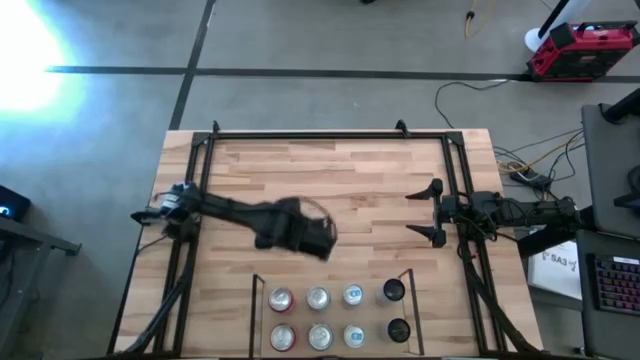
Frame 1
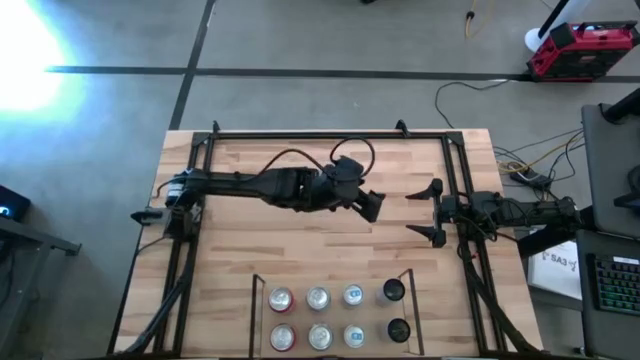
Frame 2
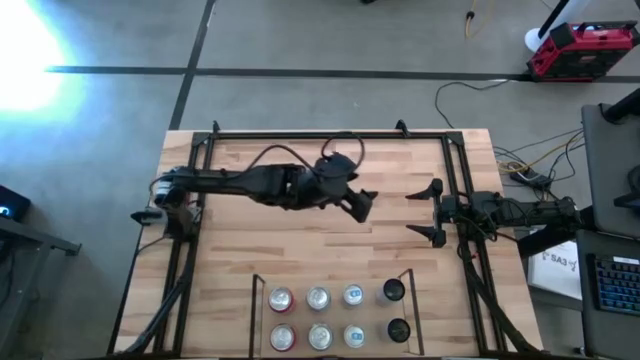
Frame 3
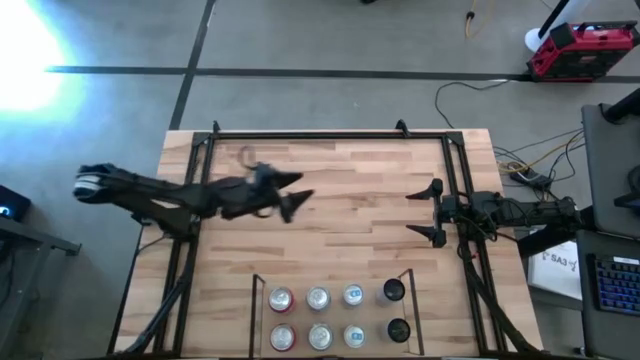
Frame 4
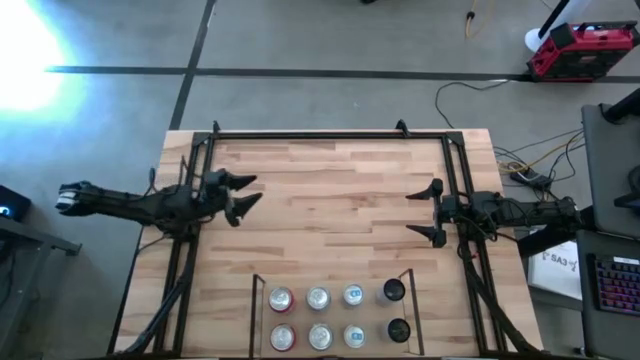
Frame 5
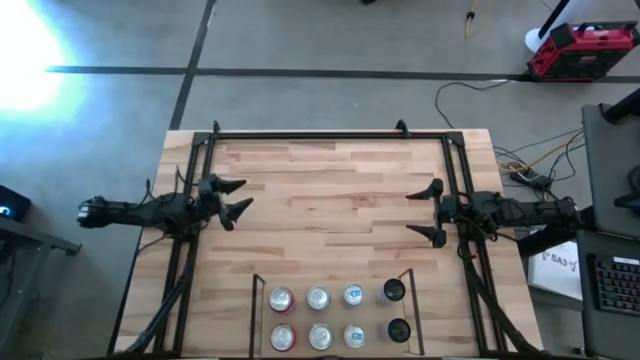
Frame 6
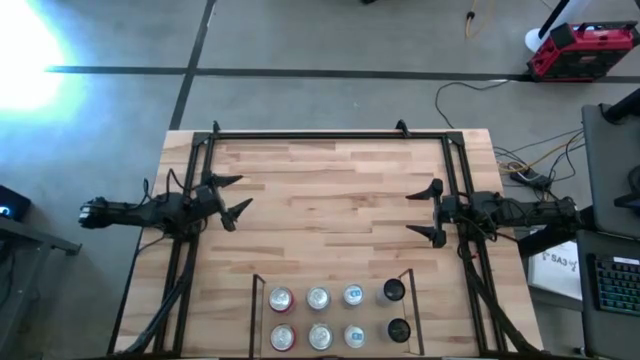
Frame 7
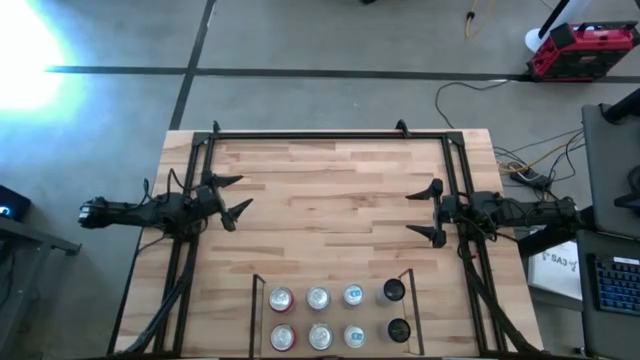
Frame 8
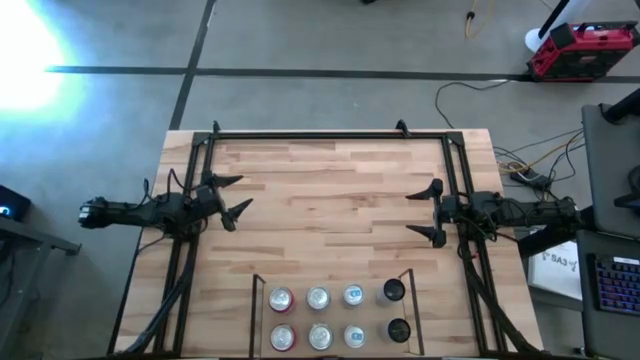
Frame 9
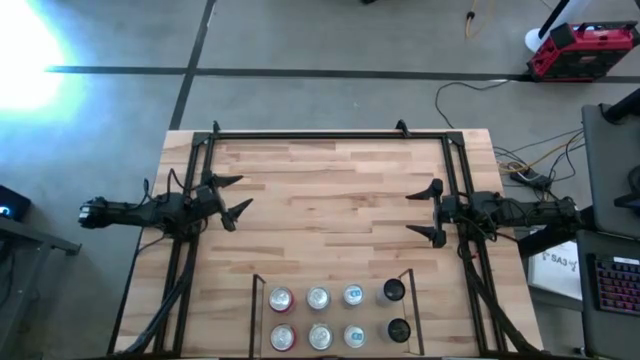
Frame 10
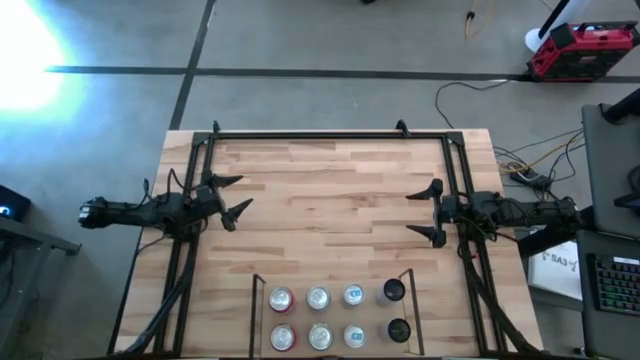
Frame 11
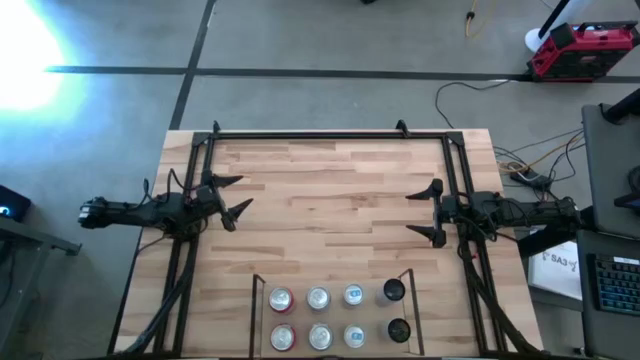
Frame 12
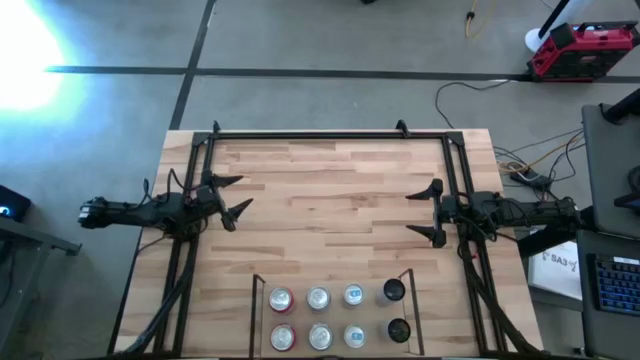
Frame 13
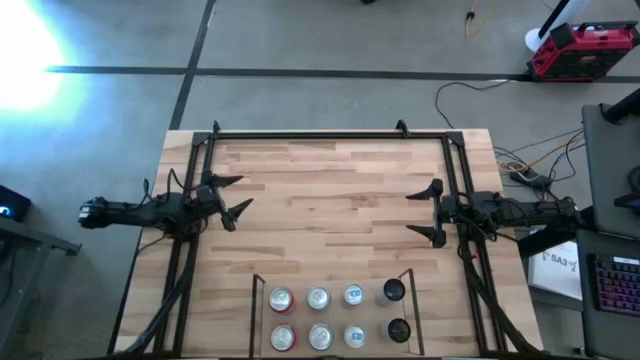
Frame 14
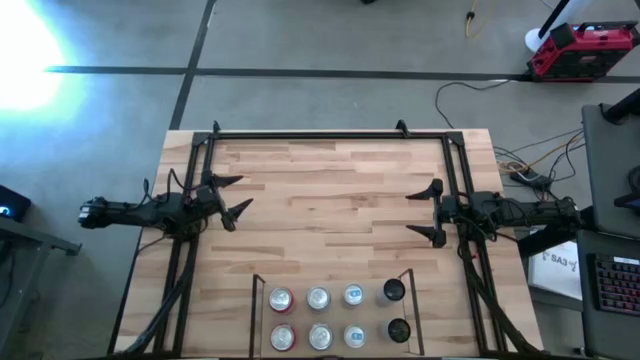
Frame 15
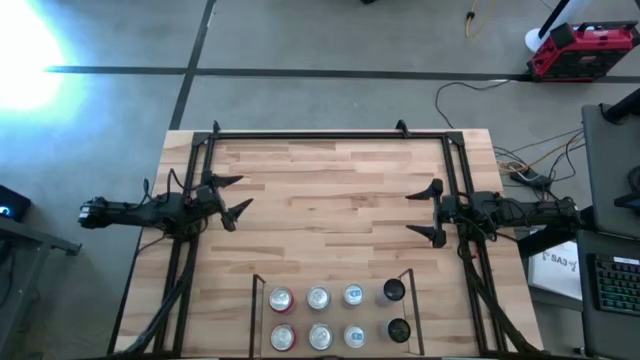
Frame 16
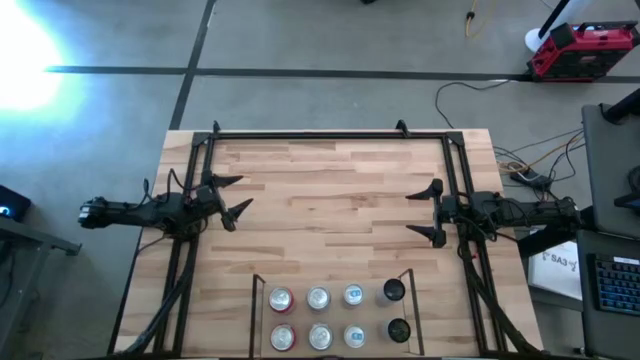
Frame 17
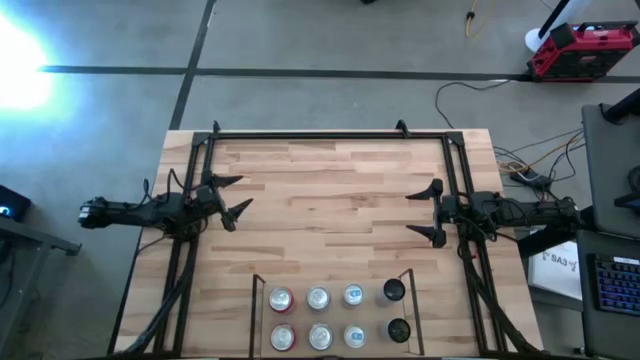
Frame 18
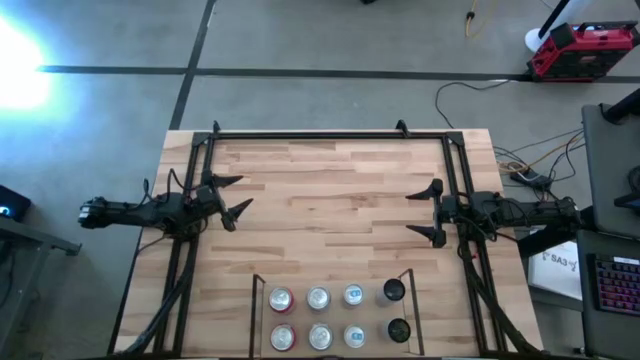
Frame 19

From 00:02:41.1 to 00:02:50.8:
Task: Place canned beverage on shelf
Return to Home Position

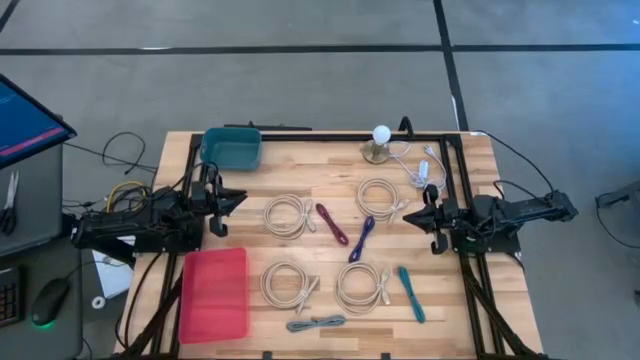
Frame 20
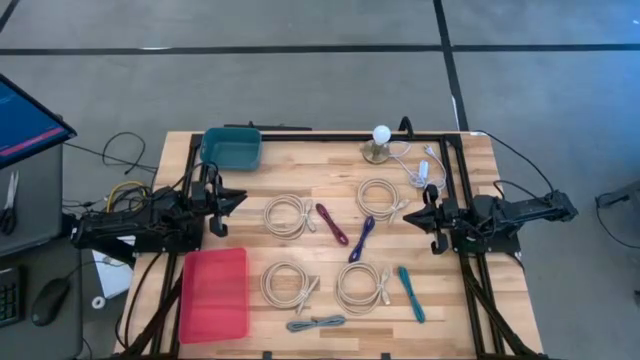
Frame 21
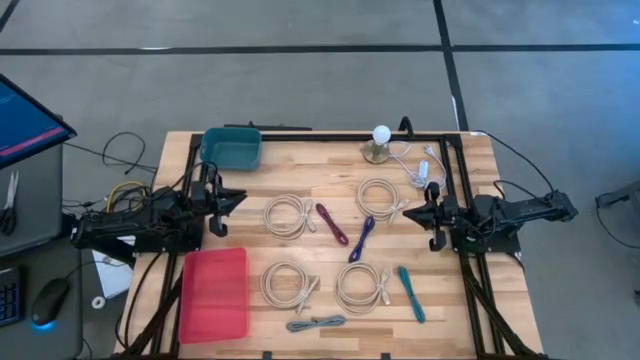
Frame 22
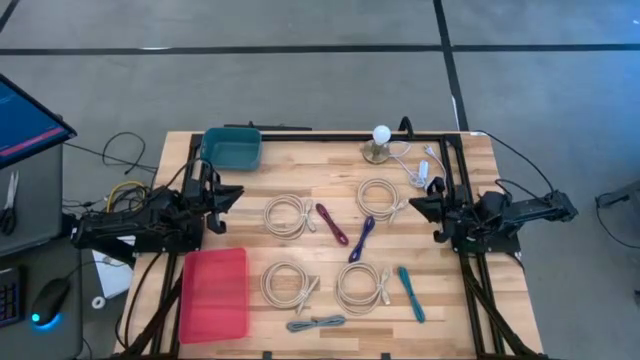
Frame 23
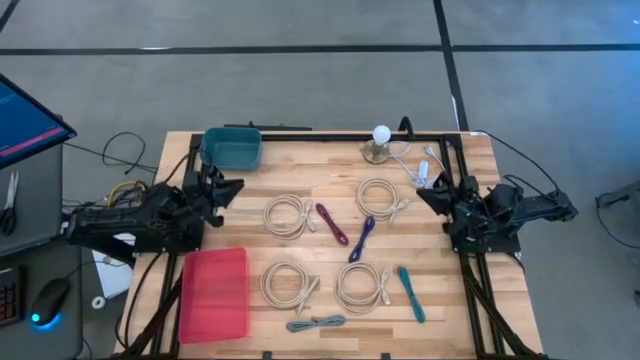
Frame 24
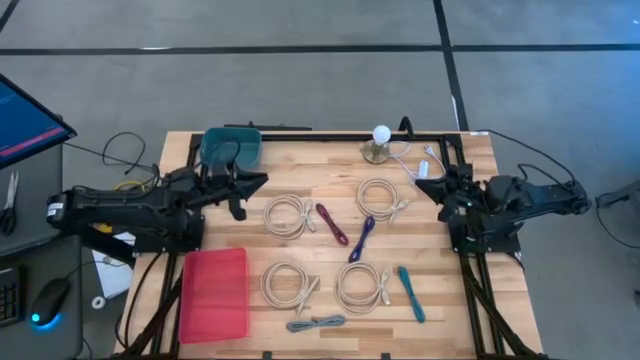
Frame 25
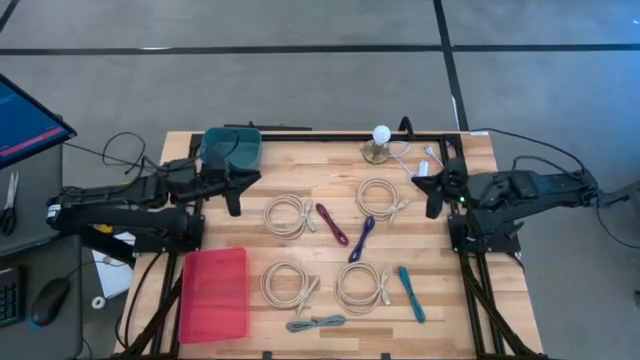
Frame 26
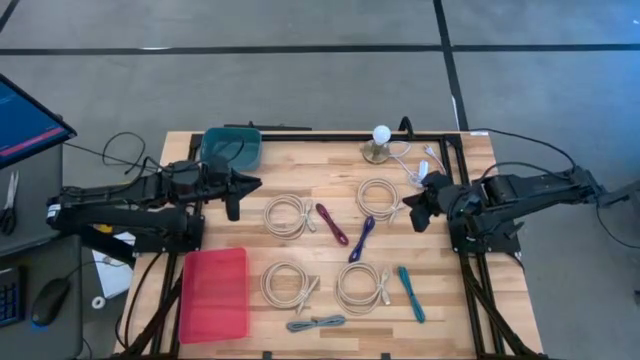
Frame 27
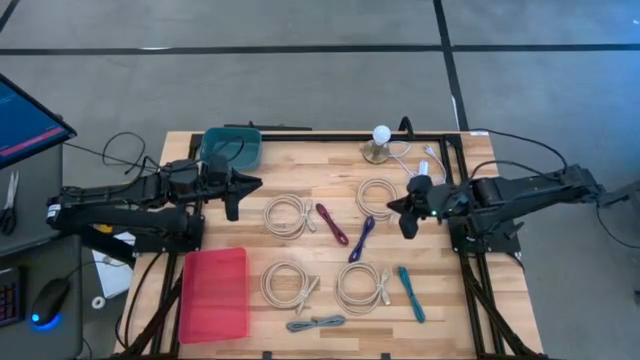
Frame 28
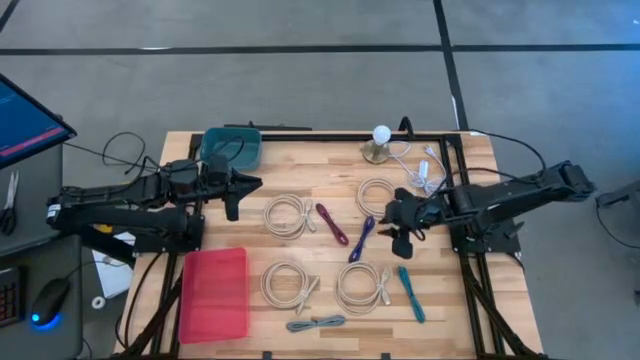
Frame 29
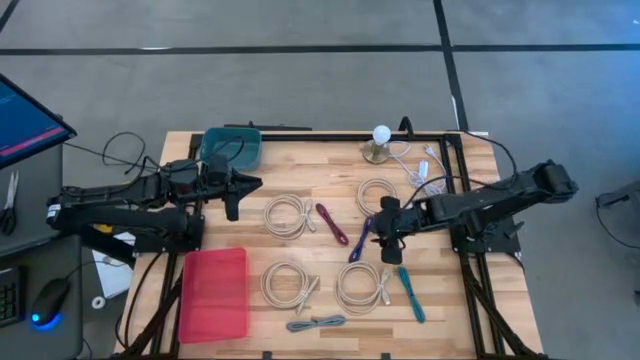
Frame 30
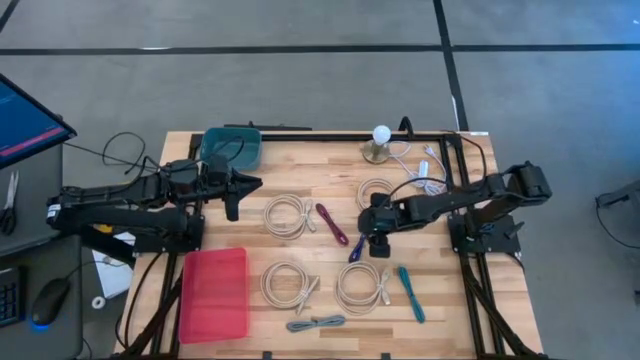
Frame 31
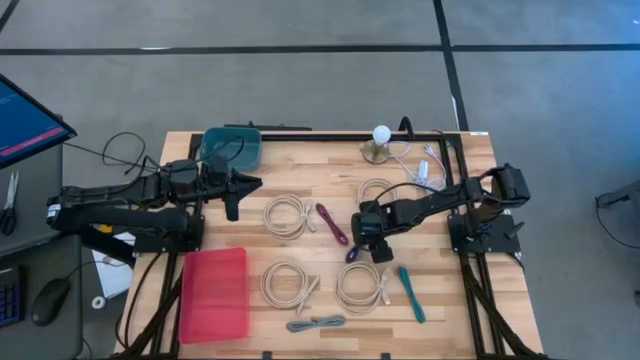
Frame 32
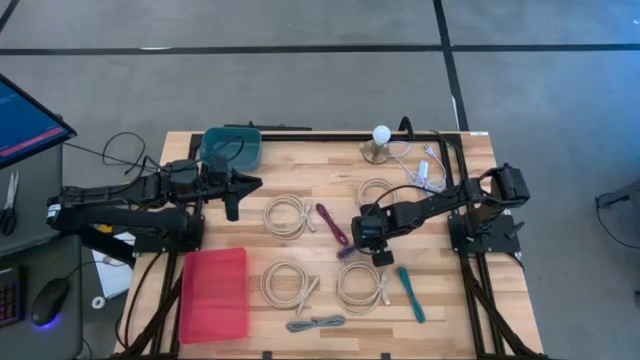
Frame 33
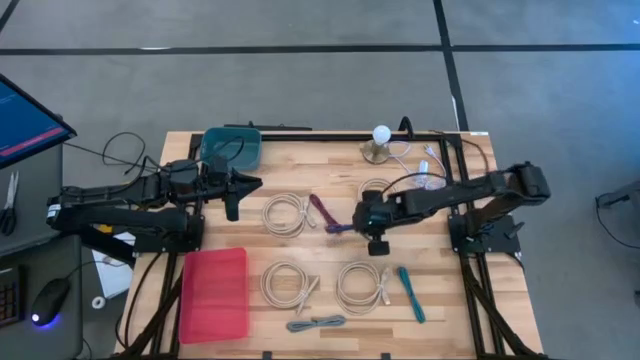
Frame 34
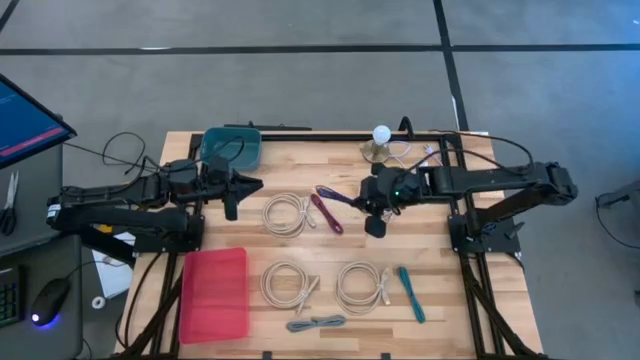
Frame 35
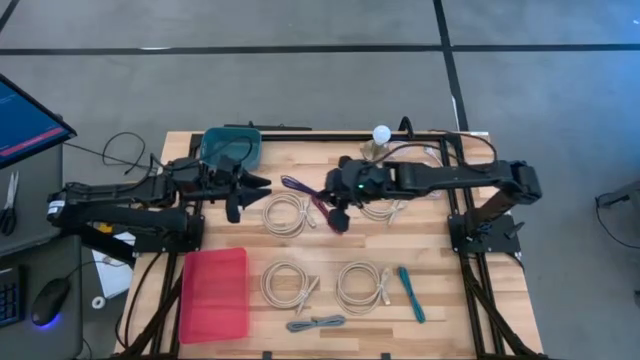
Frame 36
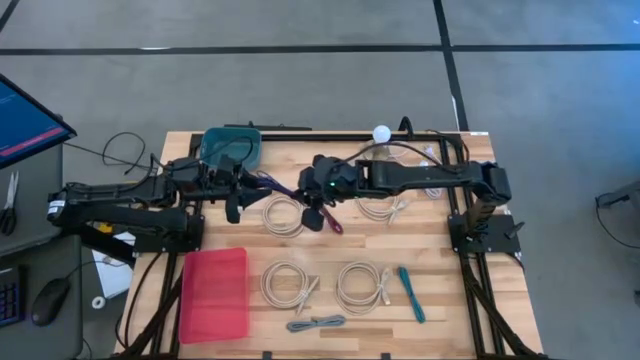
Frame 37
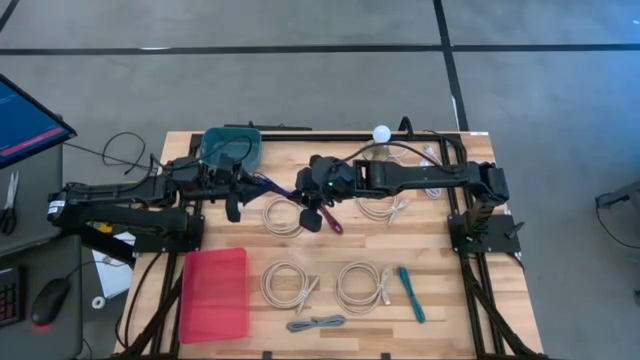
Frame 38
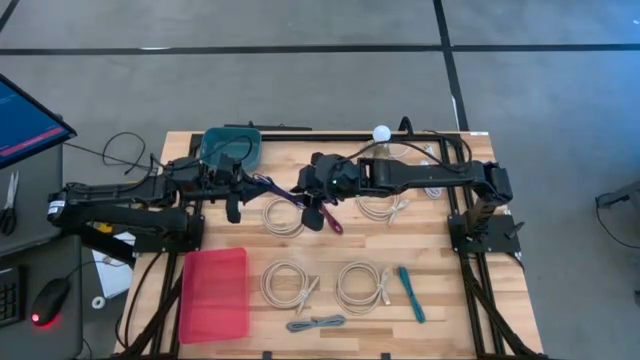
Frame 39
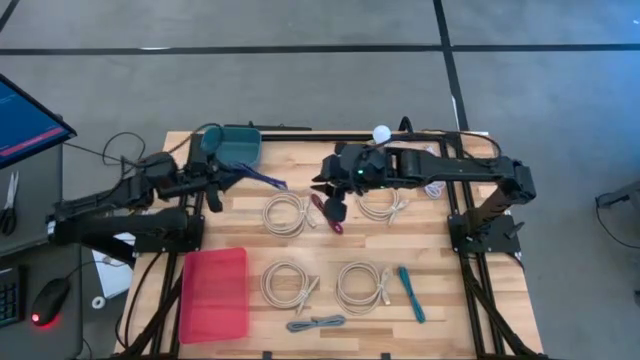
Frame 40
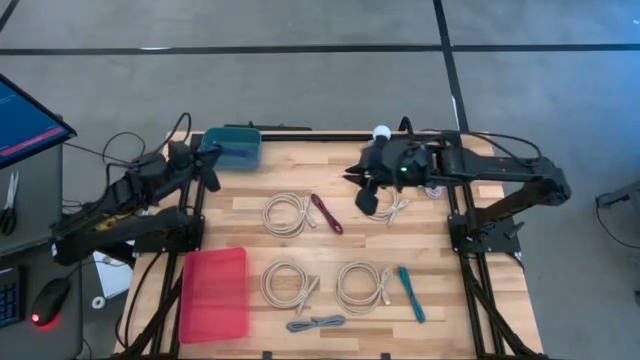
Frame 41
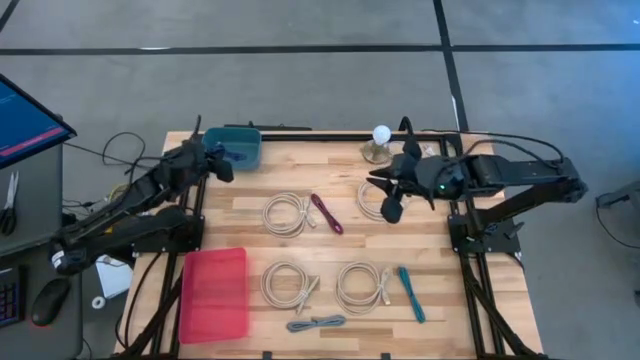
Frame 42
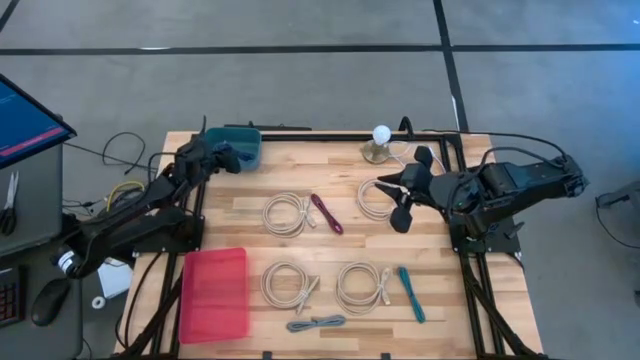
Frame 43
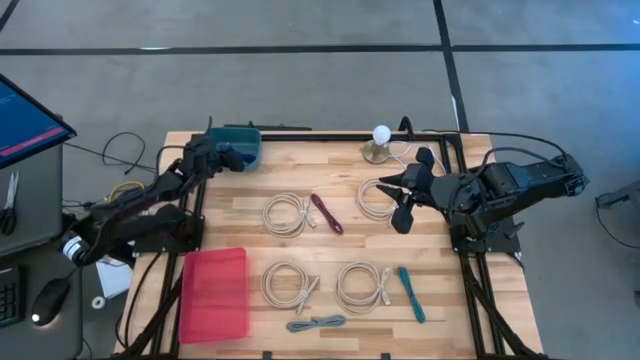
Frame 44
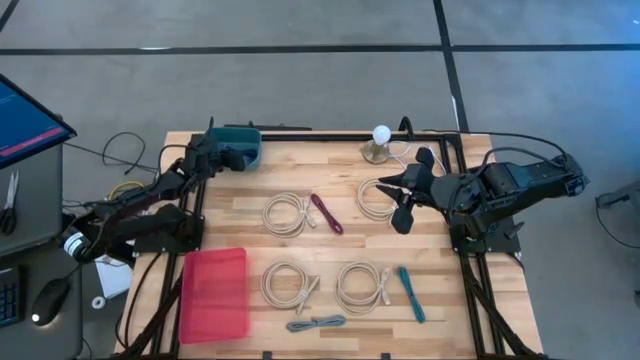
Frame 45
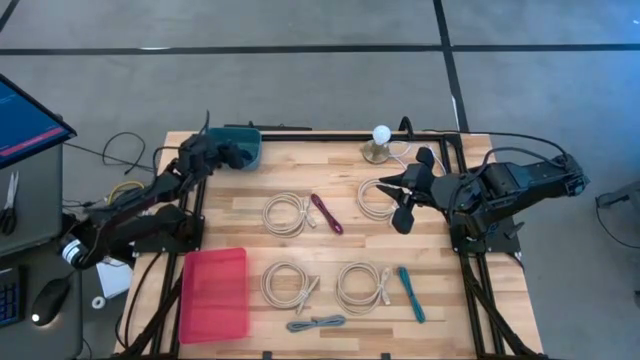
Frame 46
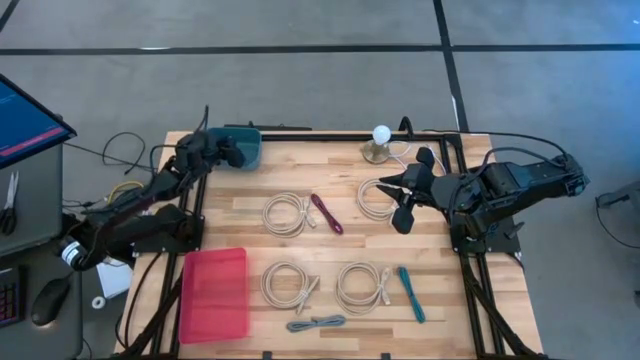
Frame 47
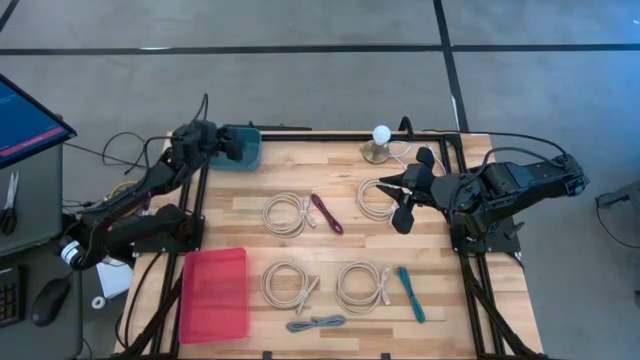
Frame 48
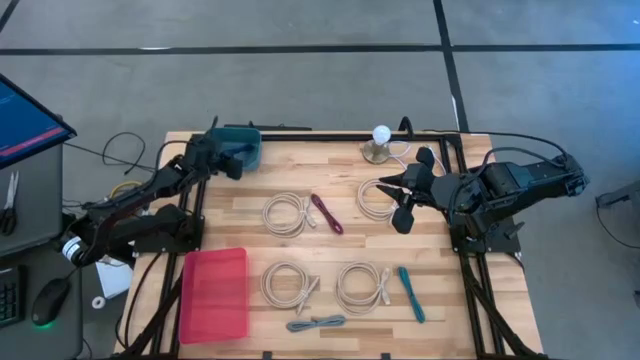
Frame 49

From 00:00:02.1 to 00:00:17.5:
Task: Pick & Place USB Port
Put the violet USB cable into the blue bin
